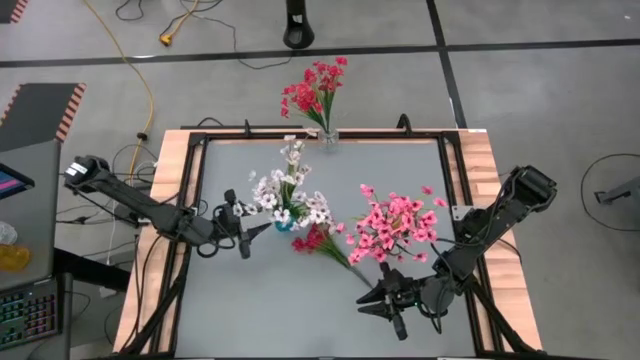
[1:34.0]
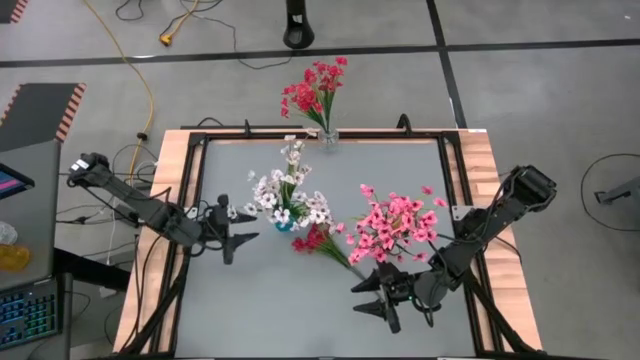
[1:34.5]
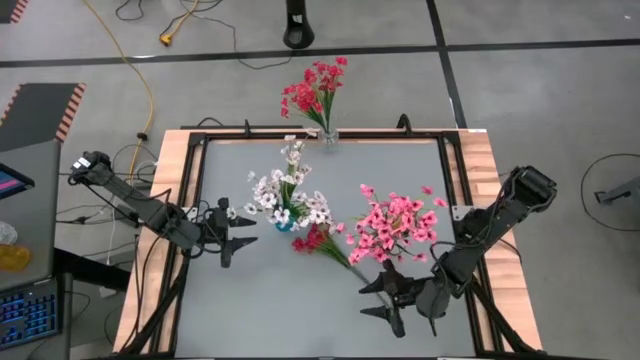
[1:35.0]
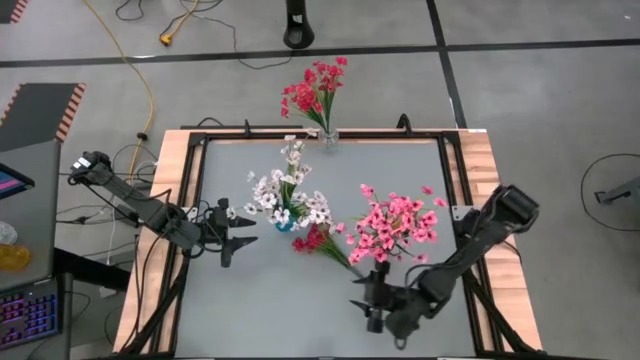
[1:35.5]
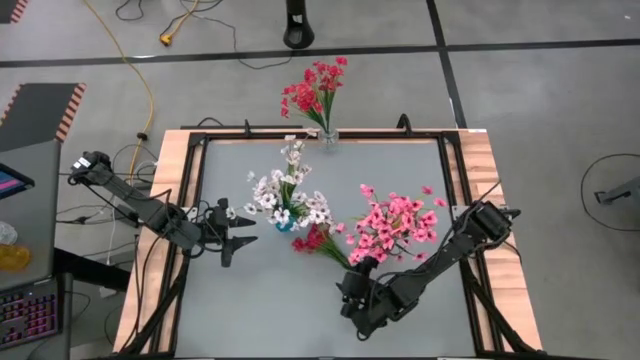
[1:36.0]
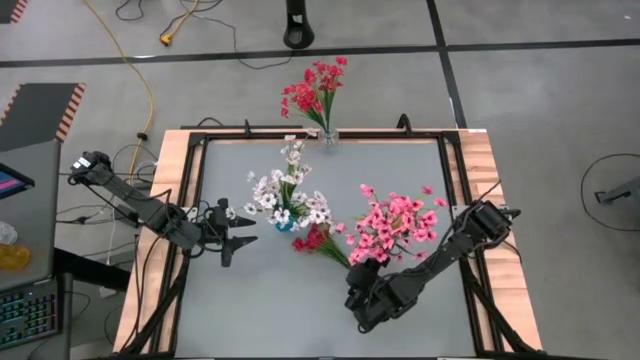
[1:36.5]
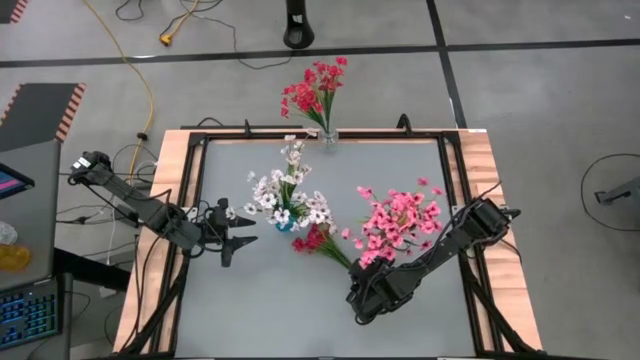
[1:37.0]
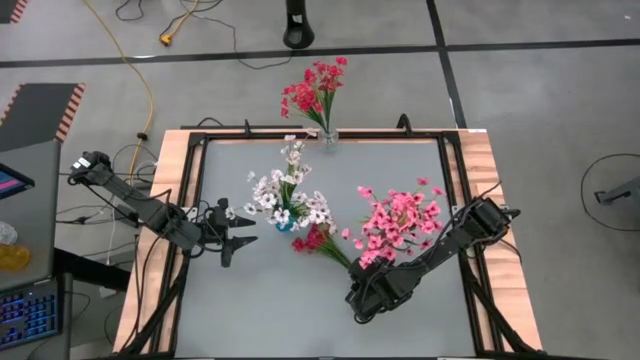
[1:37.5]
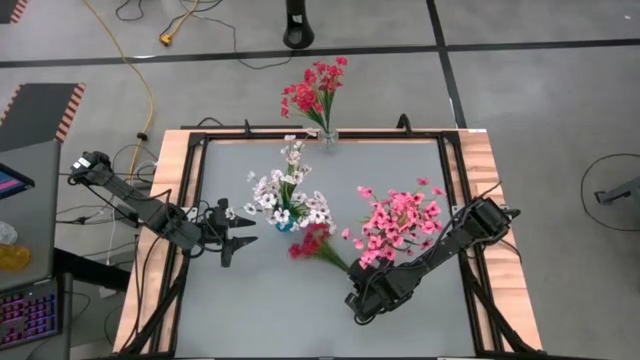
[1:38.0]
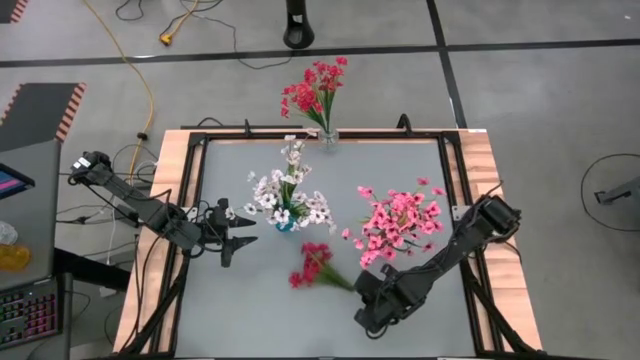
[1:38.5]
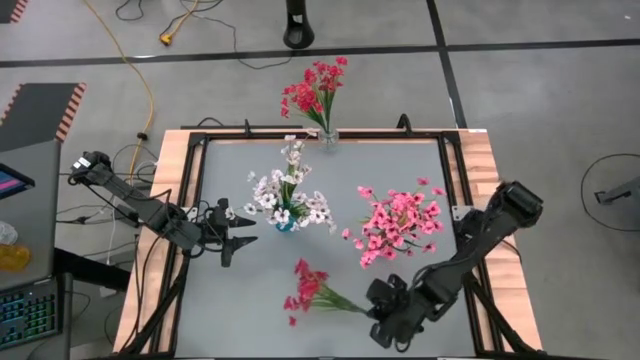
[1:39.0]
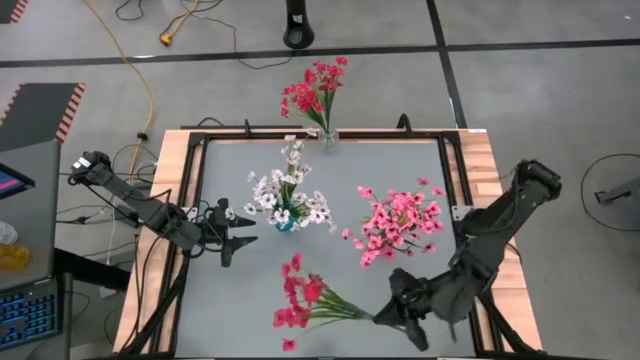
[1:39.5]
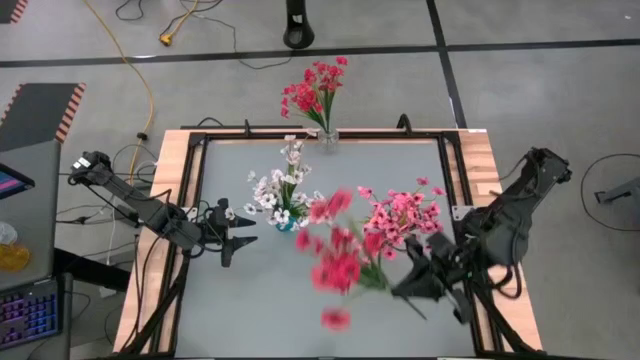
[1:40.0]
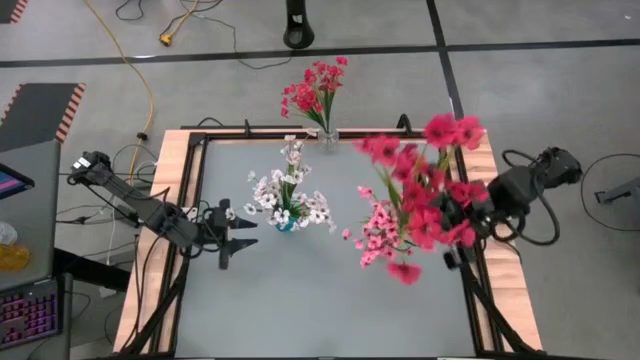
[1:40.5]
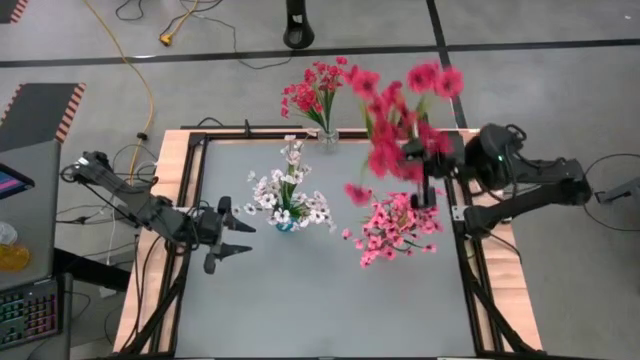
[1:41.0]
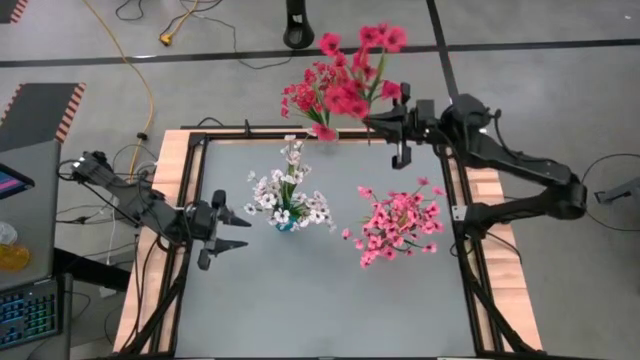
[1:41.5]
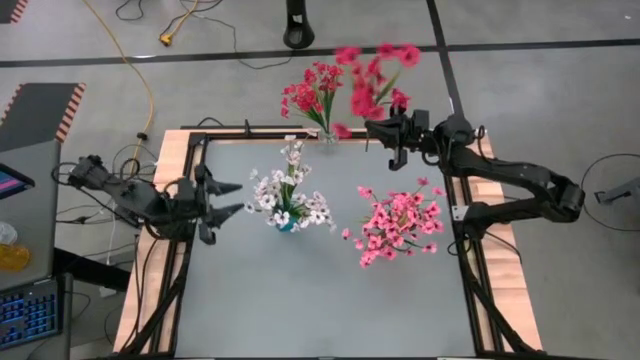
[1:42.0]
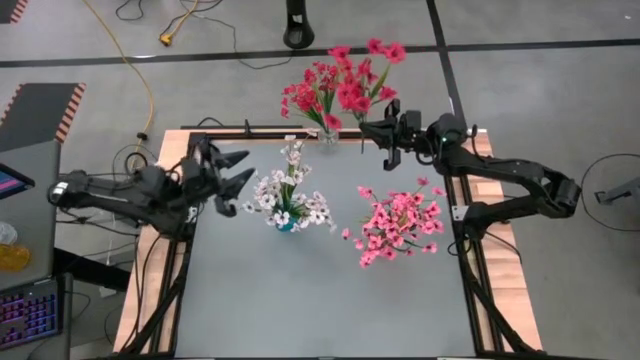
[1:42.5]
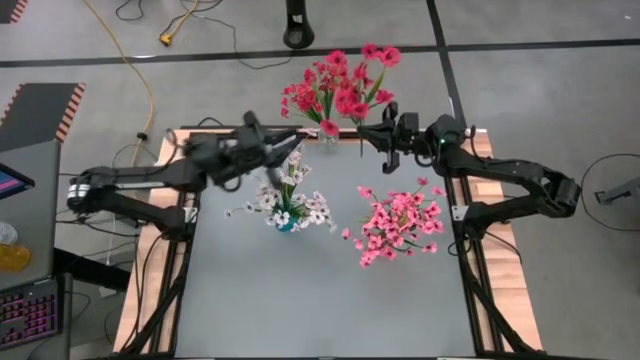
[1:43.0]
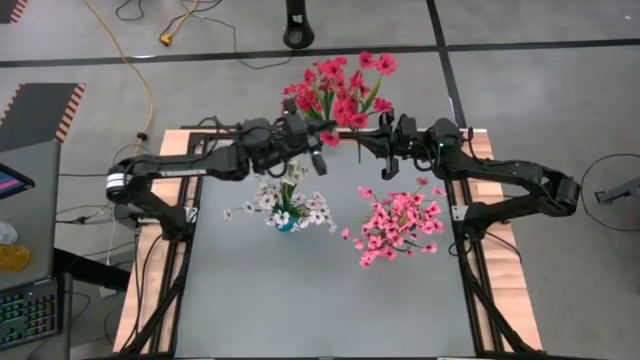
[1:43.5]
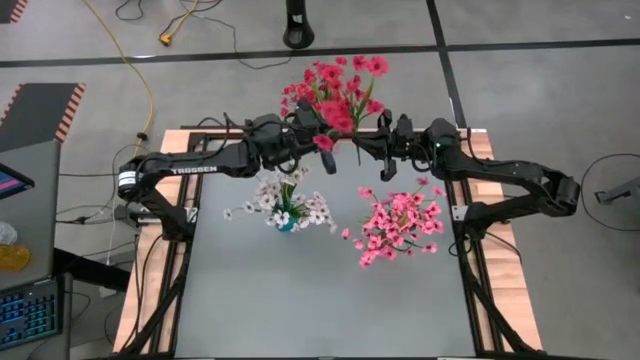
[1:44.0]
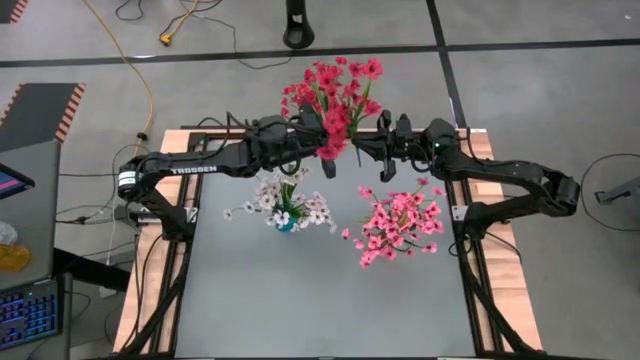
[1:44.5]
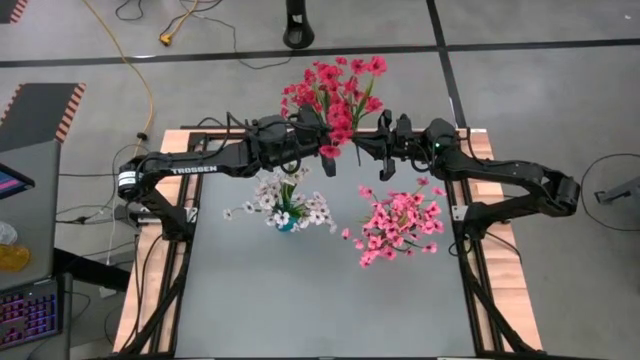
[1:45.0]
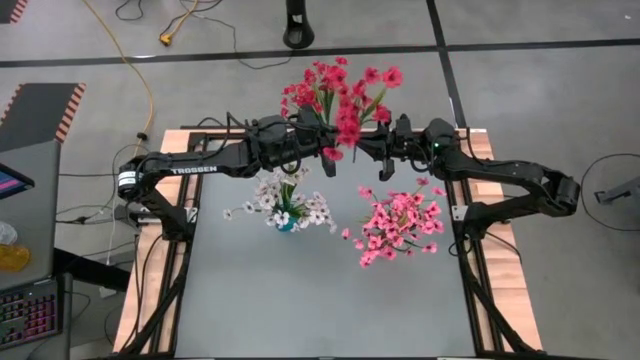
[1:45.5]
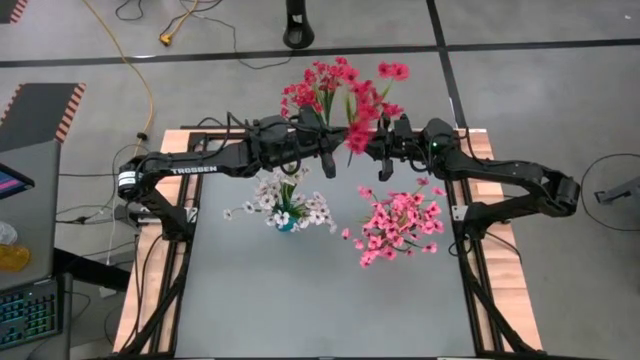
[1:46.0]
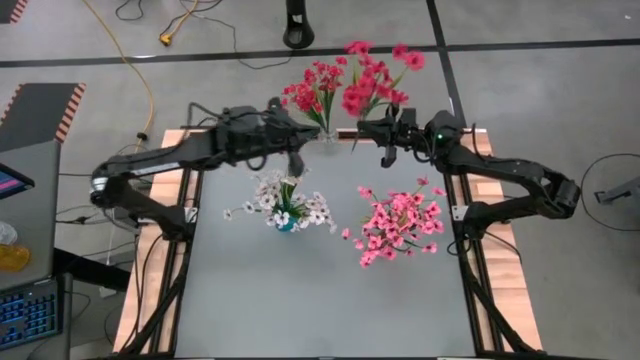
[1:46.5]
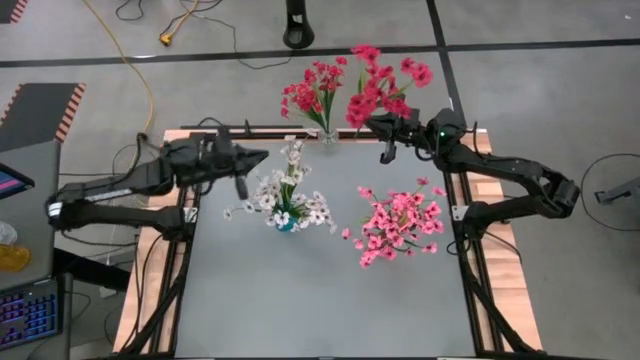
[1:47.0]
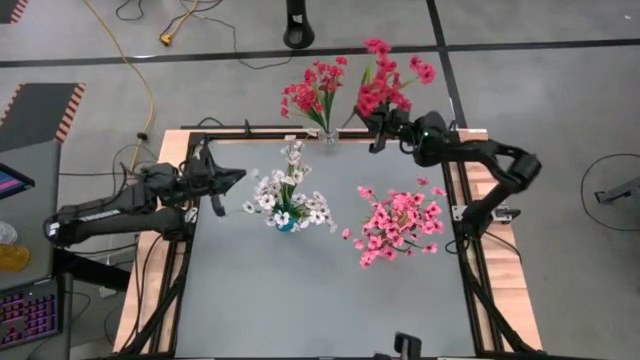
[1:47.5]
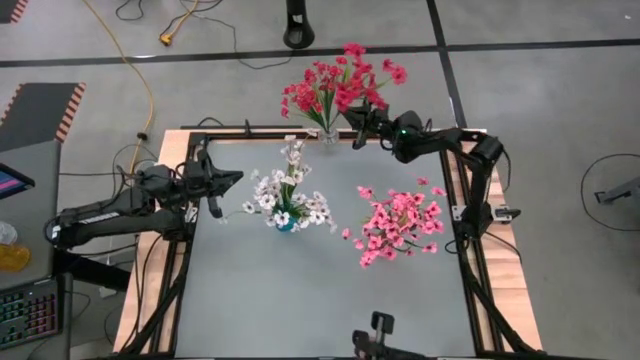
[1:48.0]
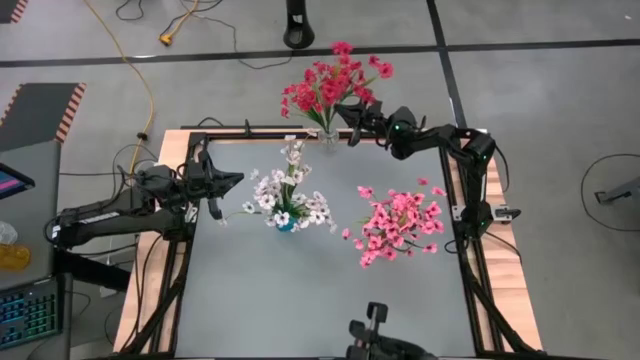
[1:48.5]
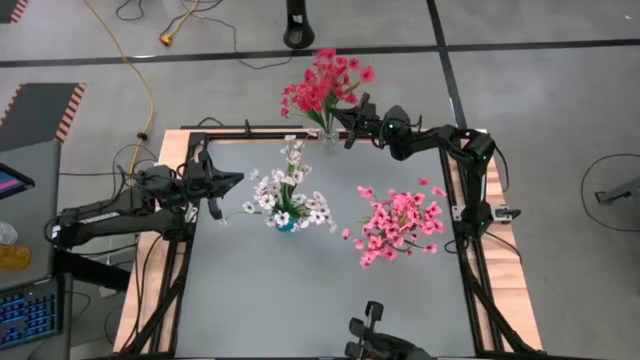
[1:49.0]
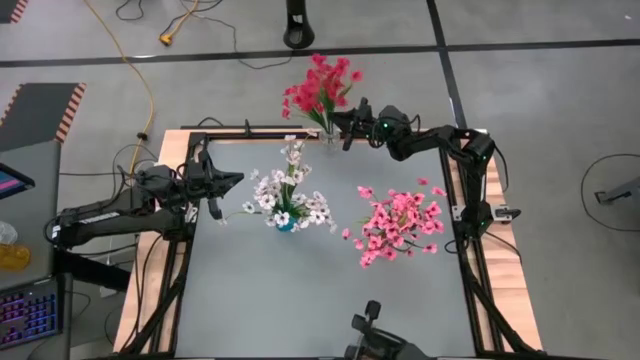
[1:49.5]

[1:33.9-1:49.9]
Task: Sort flowers into vase by color
Put the red flower into the transparent vase

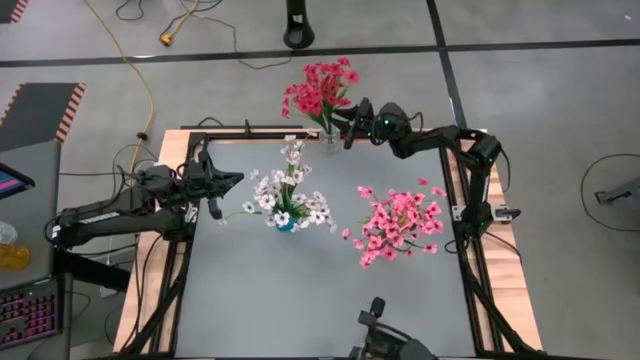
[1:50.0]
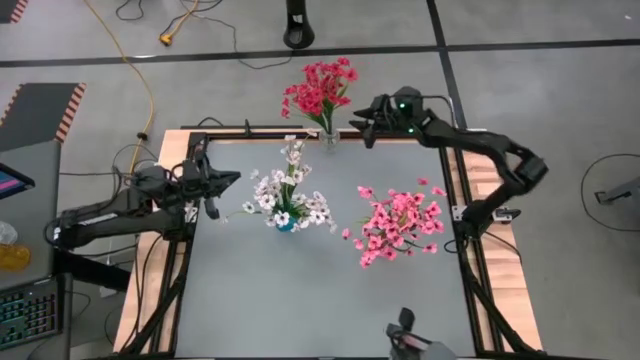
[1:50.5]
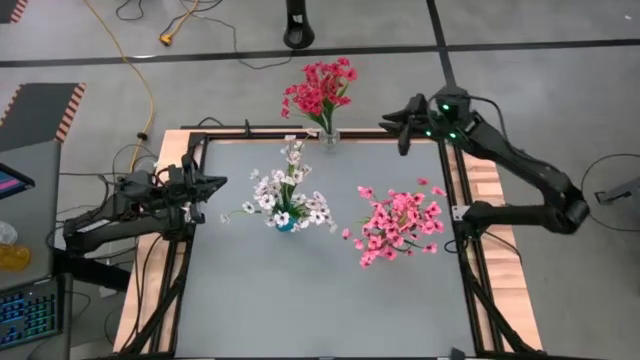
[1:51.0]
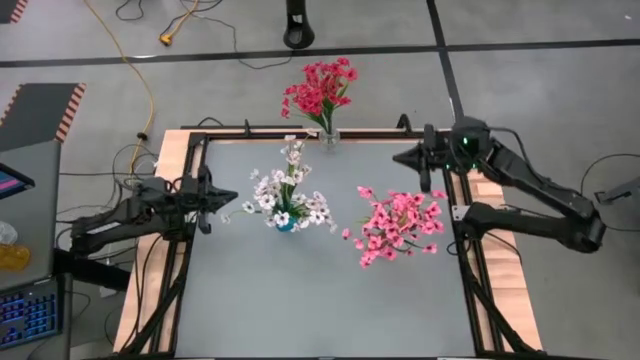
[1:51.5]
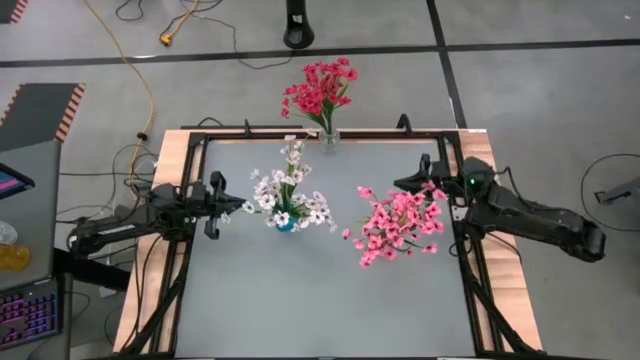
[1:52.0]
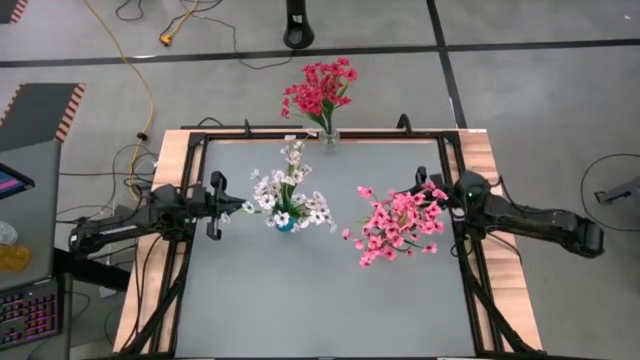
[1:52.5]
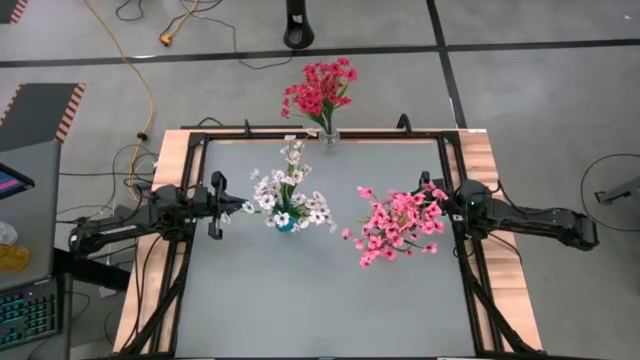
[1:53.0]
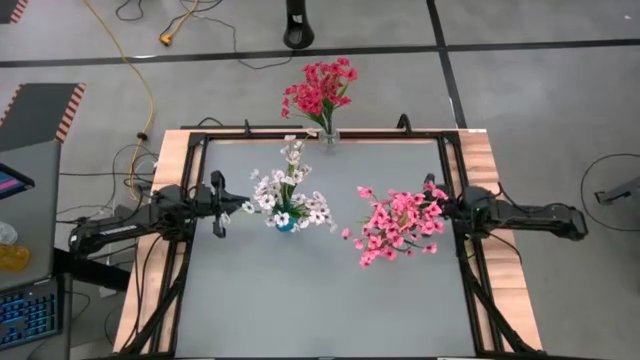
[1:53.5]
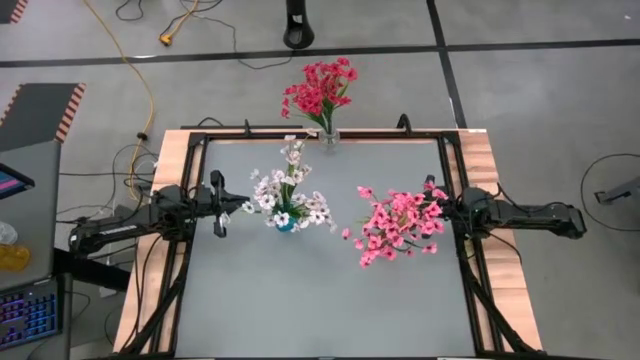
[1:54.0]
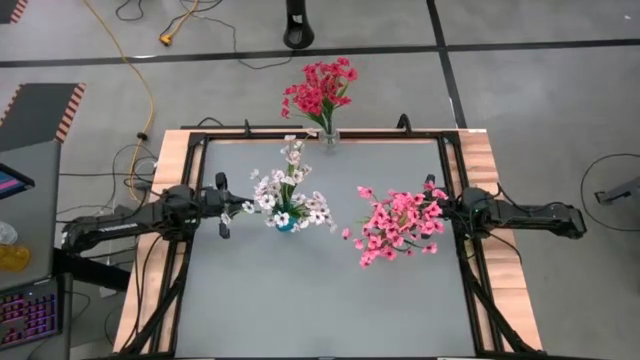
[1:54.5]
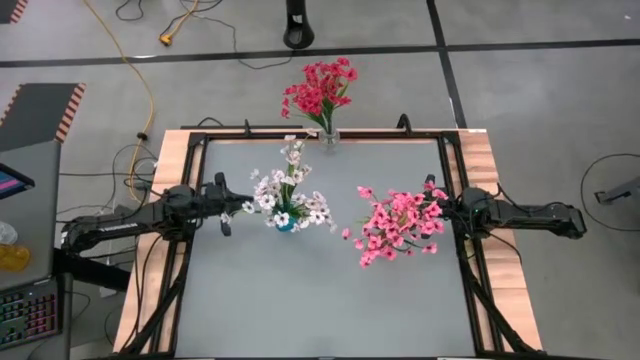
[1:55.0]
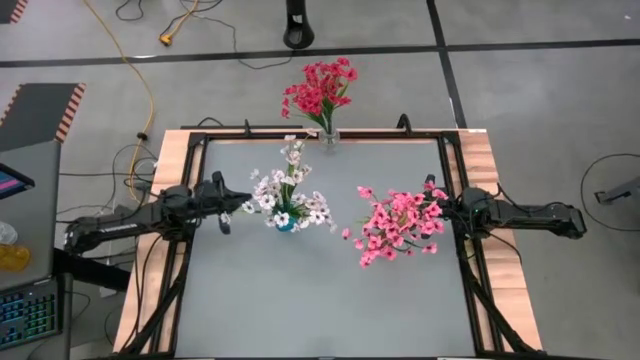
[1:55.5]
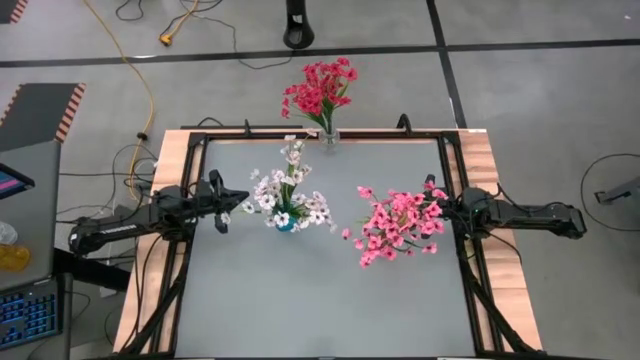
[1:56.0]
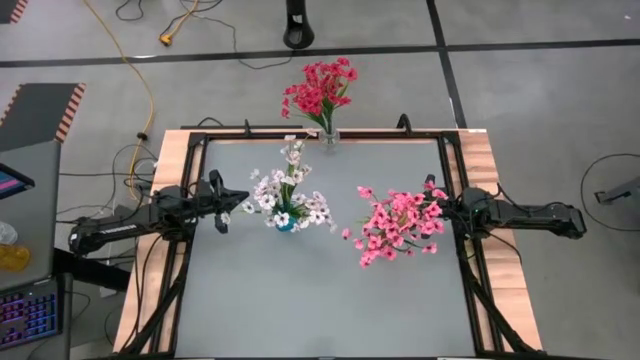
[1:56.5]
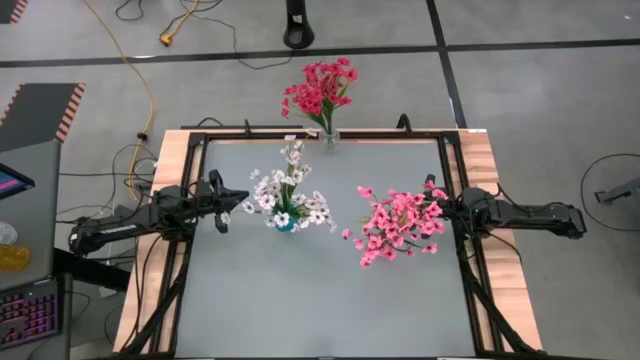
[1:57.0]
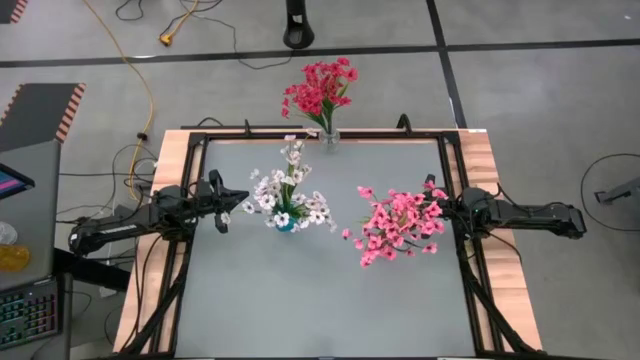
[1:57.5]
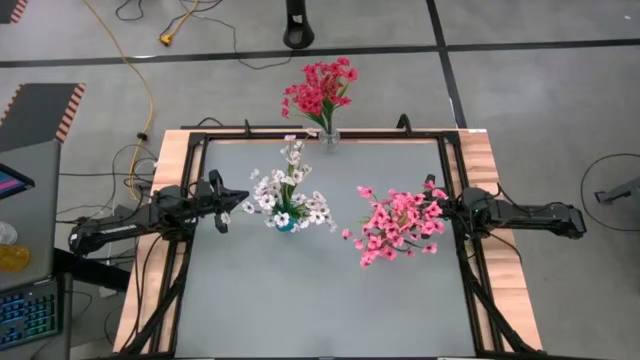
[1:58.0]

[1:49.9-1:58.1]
Return to Home Position
